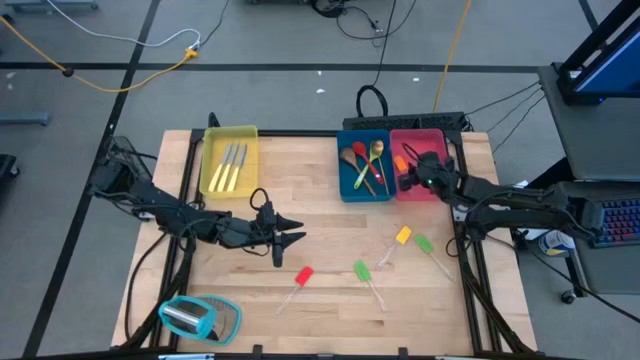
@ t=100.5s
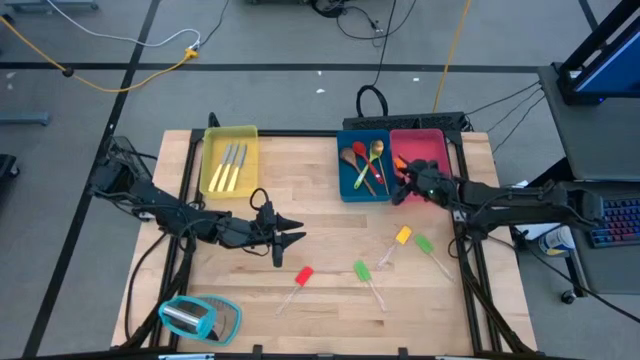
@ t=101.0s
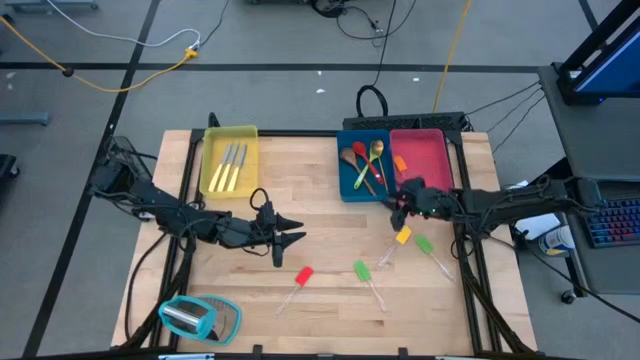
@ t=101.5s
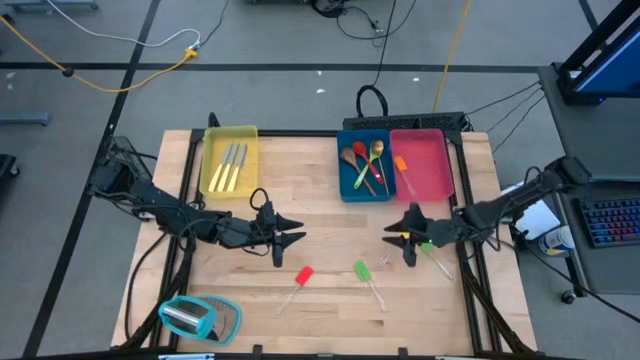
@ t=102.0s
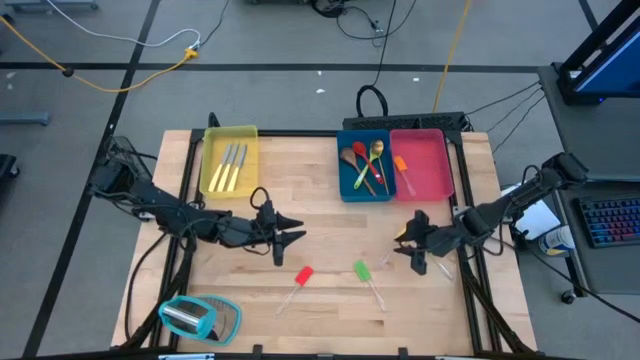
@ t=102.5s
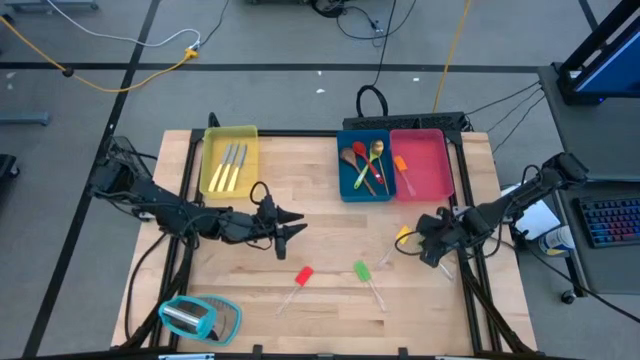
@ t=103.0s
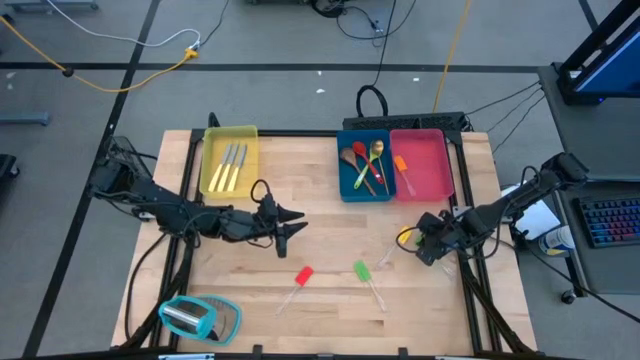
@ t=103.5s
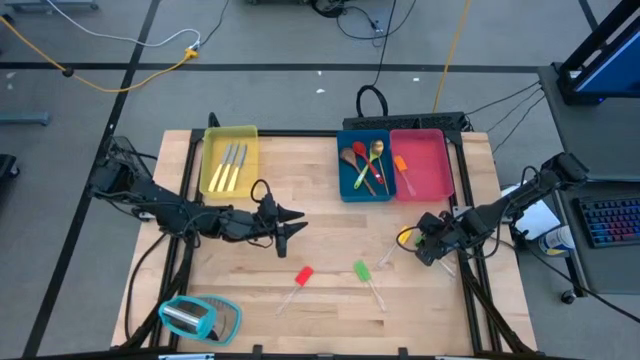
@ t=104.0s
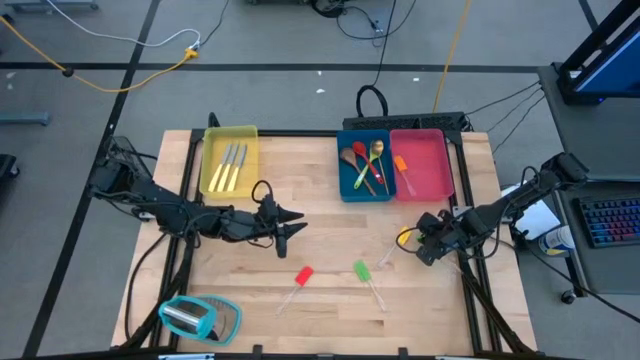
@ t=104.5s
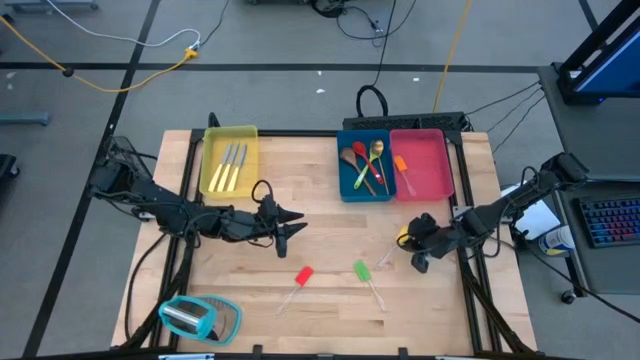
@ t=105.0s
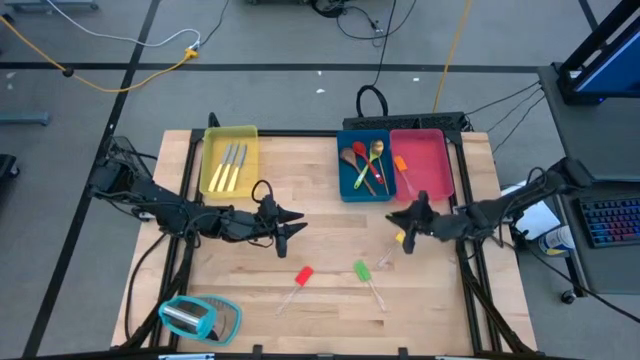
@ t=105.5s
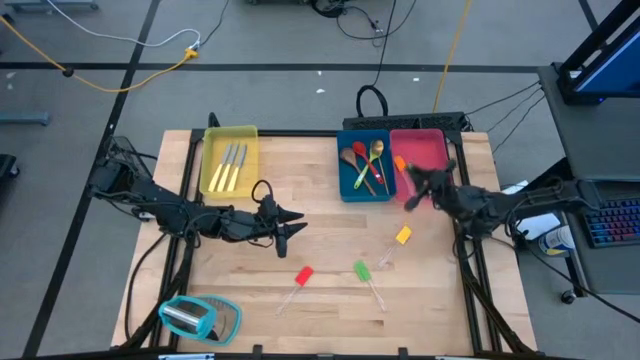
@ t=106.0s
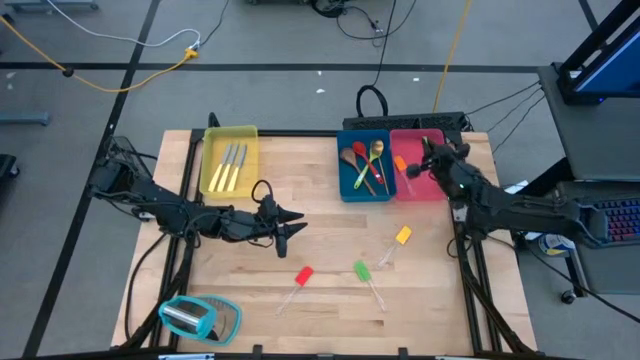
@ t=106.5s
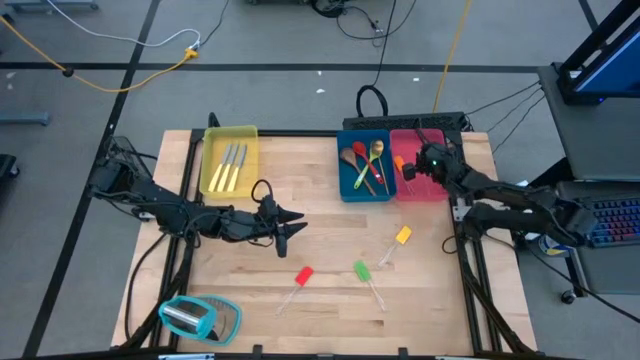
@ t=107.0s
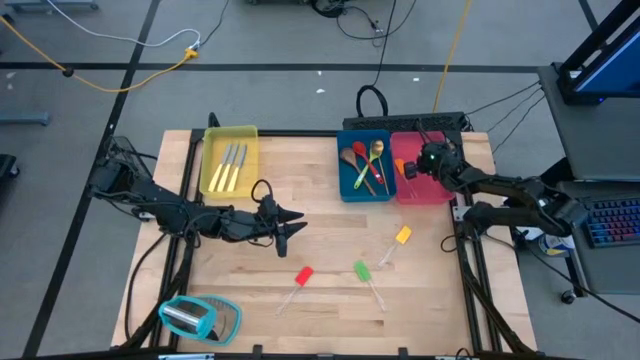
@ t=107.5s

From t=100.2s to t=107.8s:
Task: Pick & Place Kitchen Items
Put the green spatula into the pink bin

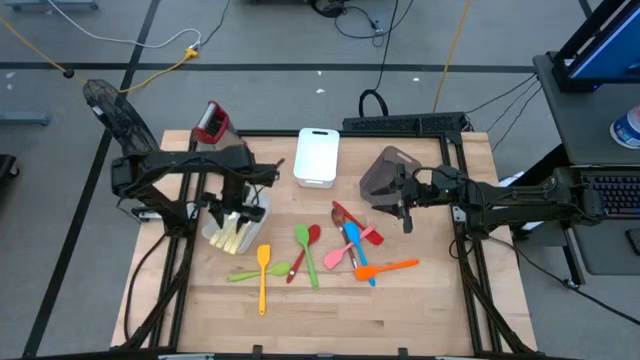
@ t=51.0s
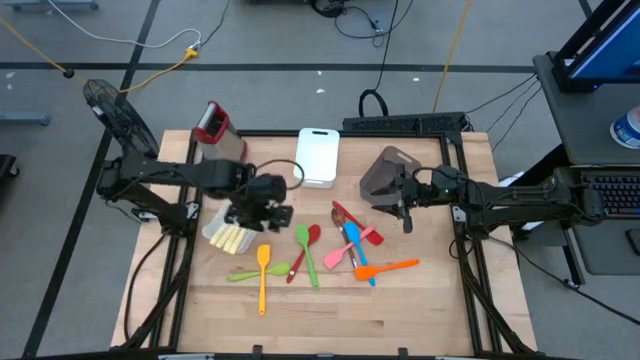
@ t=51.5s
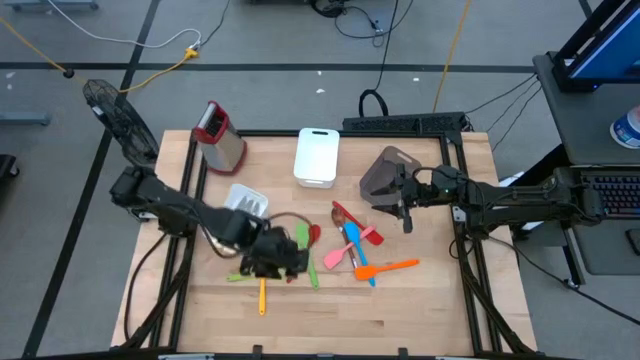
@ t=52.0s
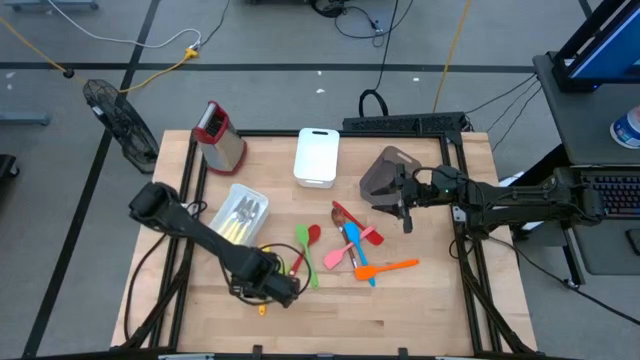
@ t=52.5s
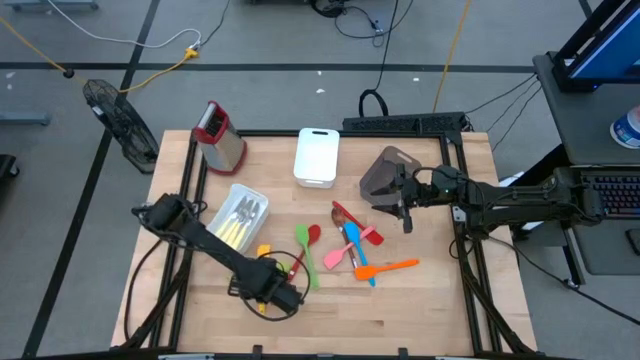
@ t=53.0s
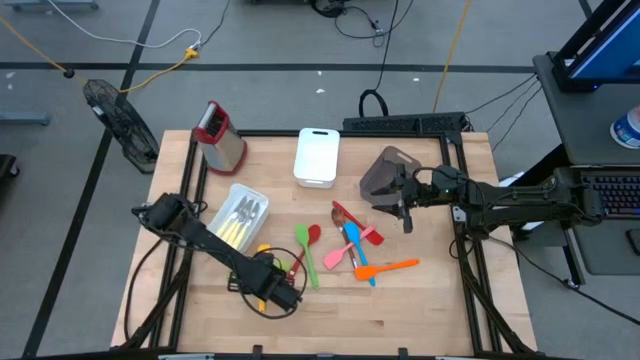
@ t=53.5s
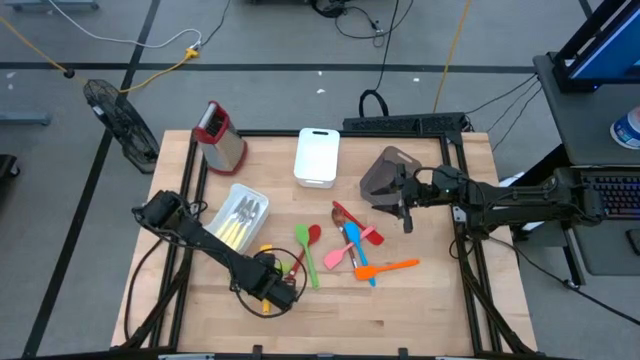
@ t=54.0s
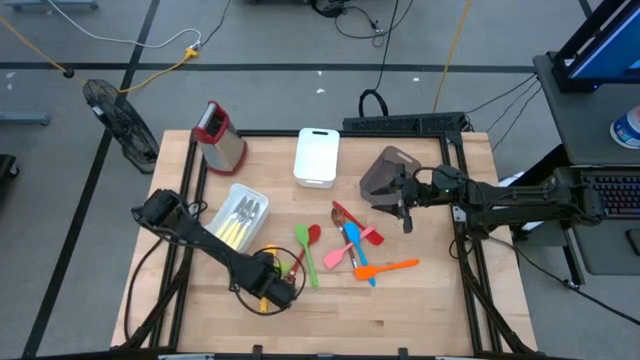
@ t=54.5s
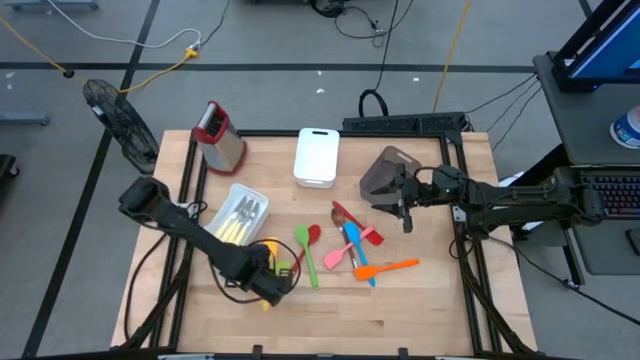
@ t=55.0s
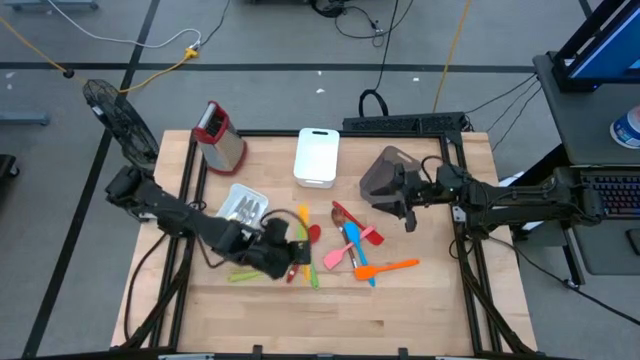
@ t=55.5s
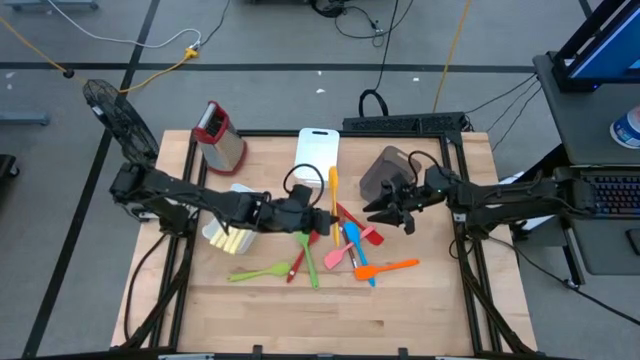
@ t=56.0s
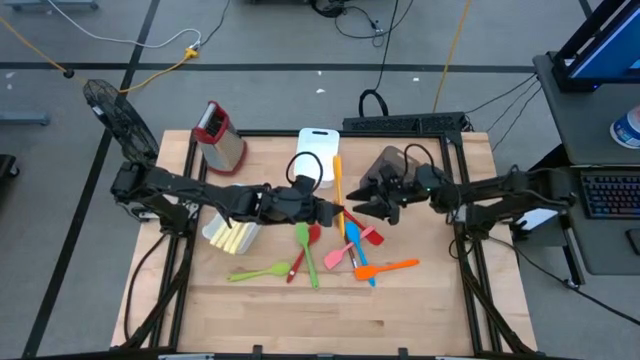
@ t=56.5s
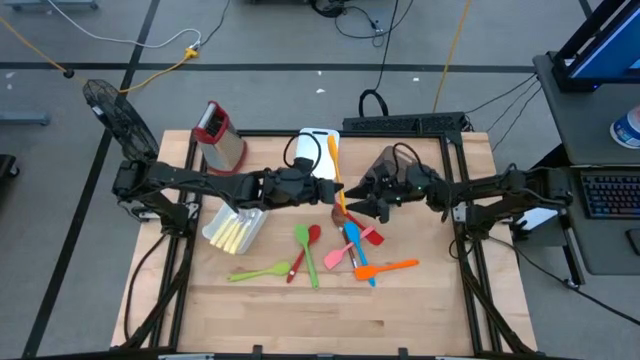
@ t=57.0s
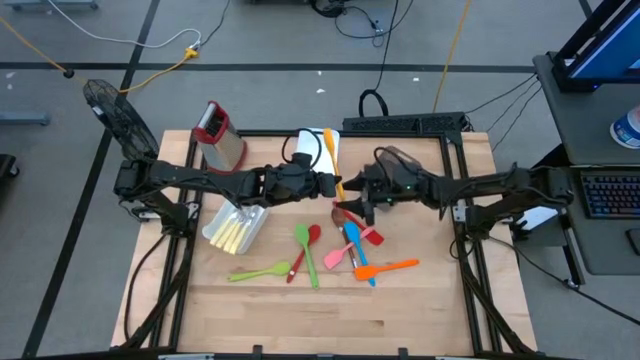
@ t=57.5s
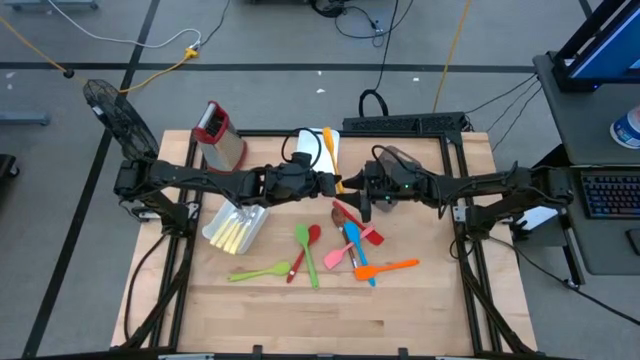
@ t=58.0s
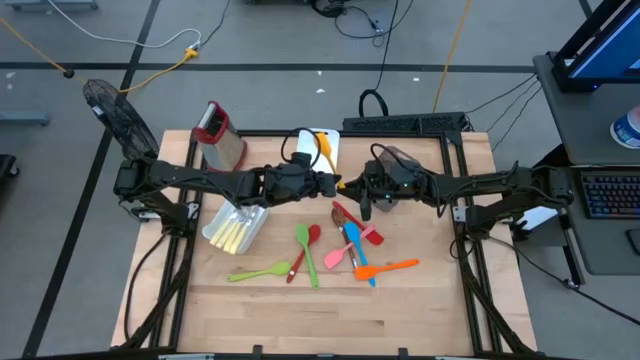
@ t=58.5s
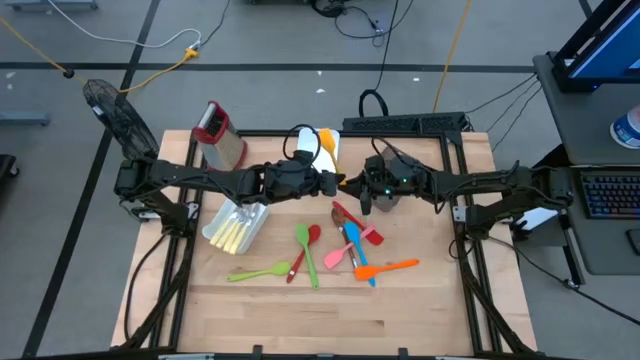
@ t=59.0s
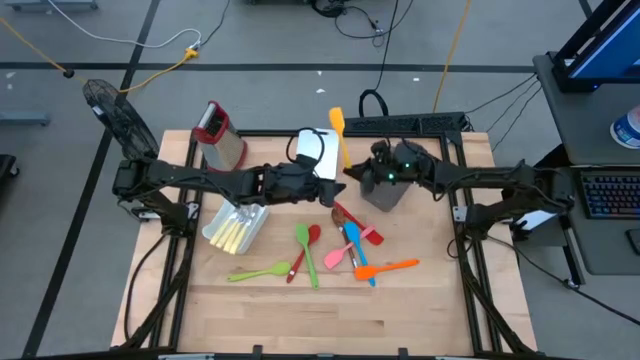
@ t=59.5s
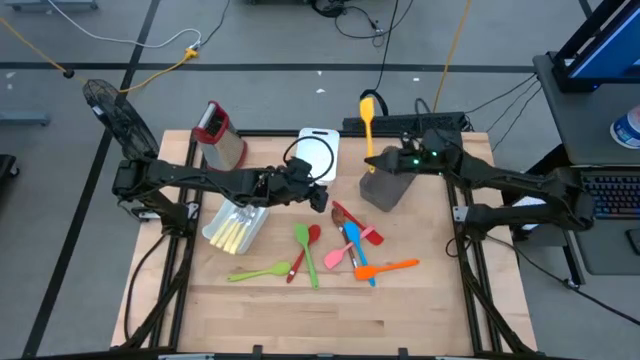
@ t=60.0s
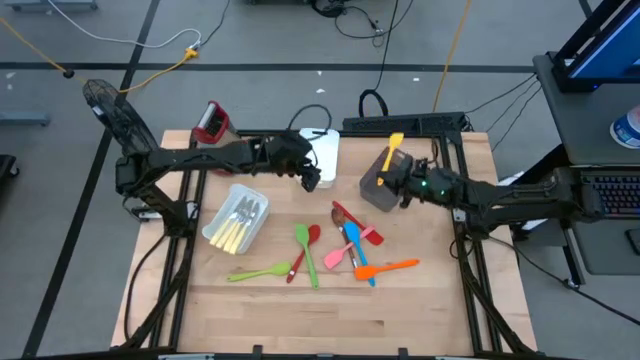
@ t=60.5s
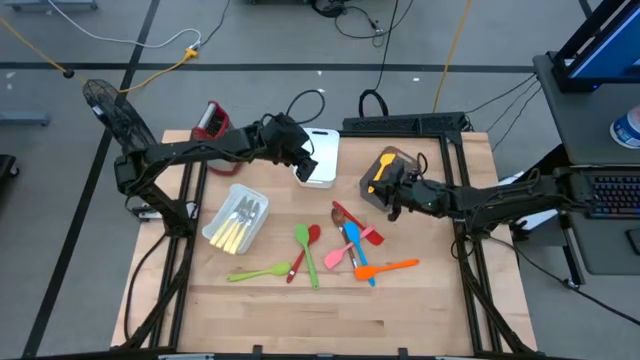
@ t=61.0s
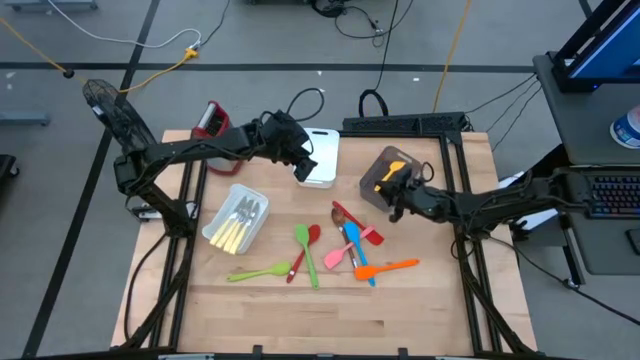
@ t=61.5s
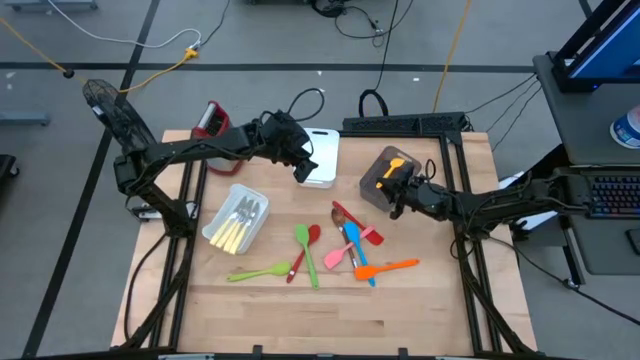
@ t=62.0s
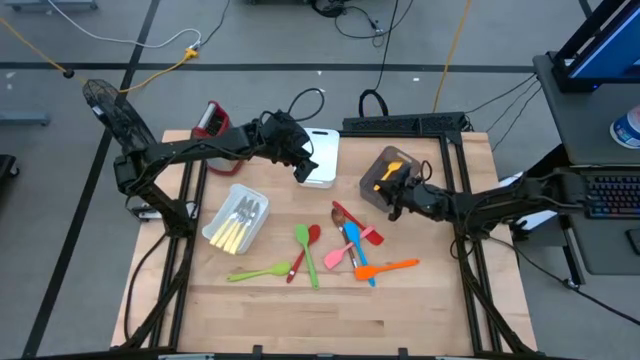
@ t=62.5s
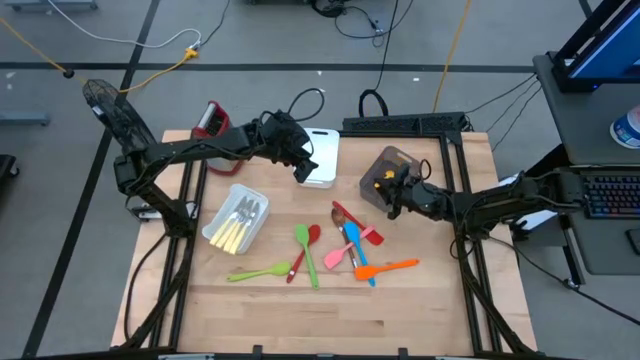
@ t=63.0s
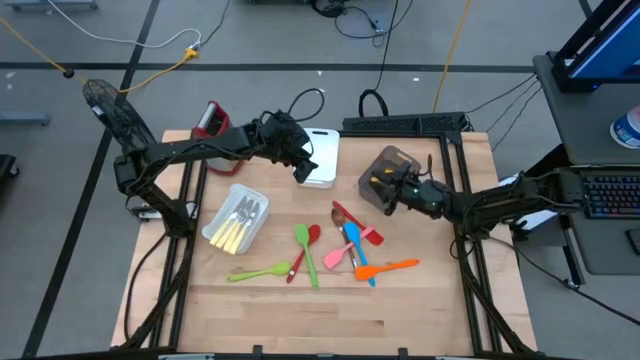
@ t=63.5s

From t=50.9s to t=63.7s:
Task: Pick & Place Kitchen Items
Put the yellow spatula into the black bin
